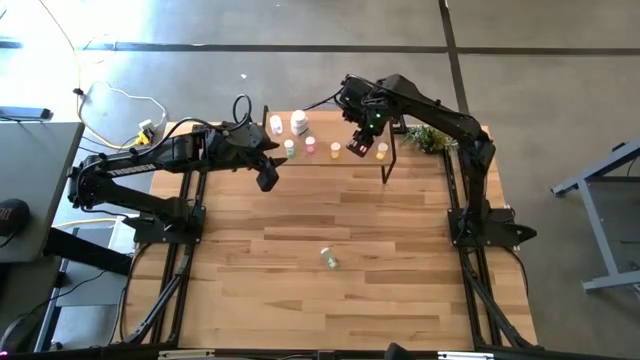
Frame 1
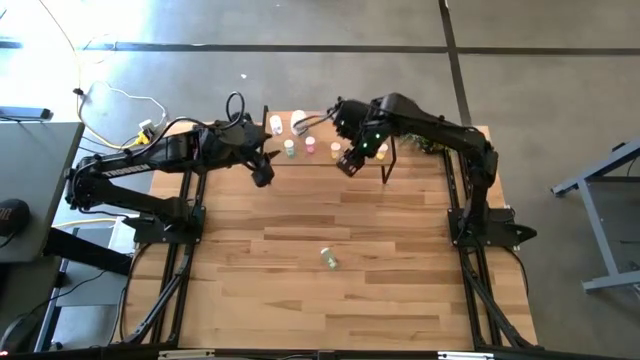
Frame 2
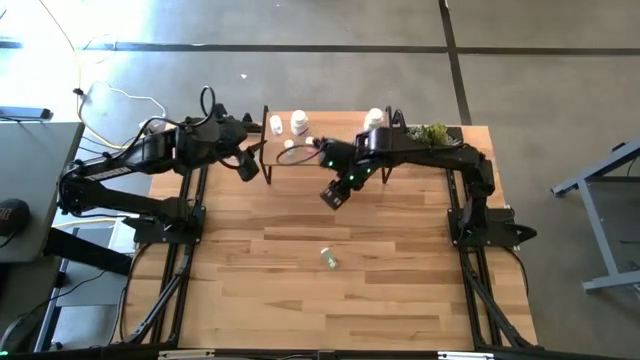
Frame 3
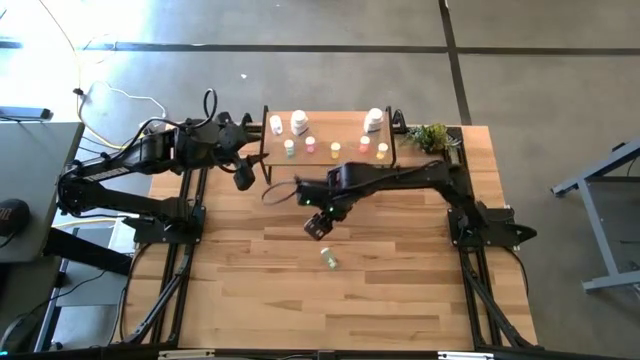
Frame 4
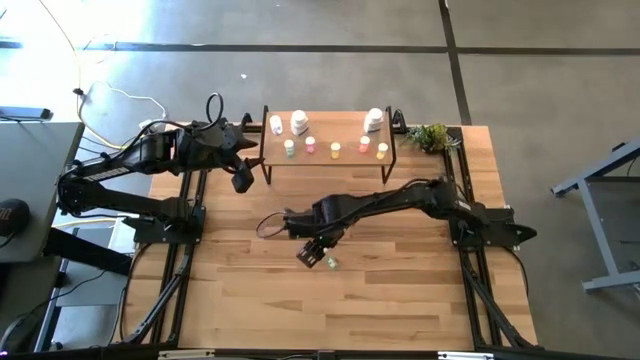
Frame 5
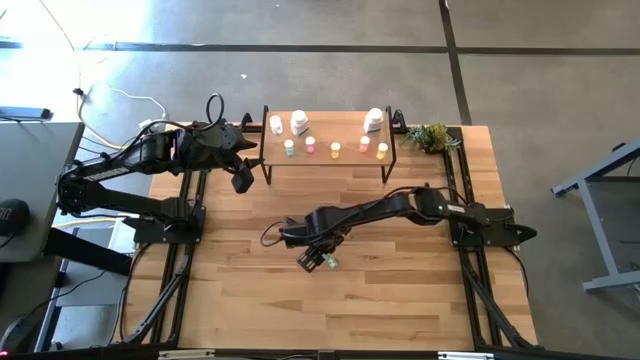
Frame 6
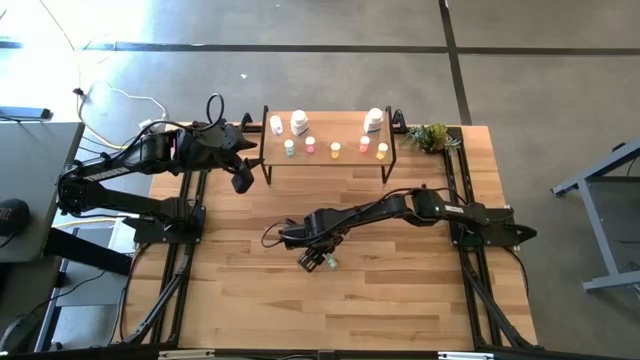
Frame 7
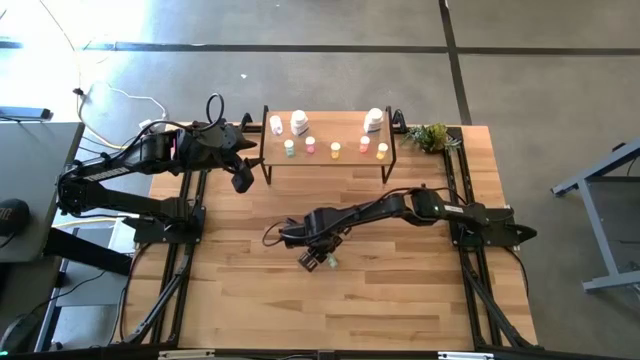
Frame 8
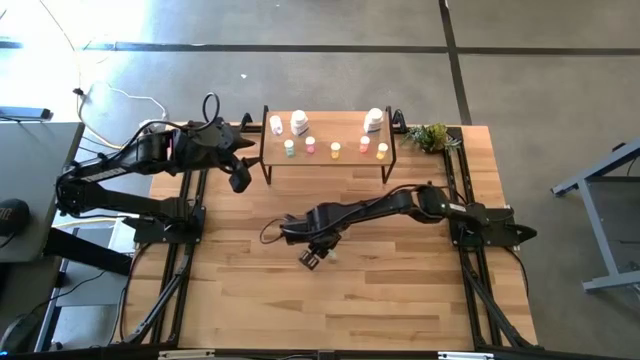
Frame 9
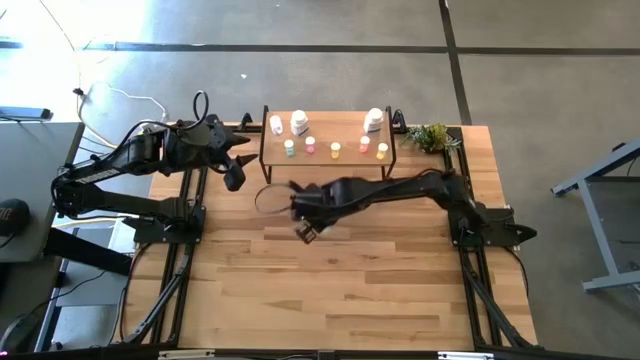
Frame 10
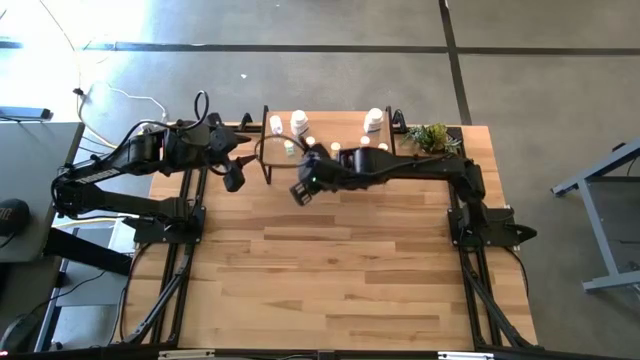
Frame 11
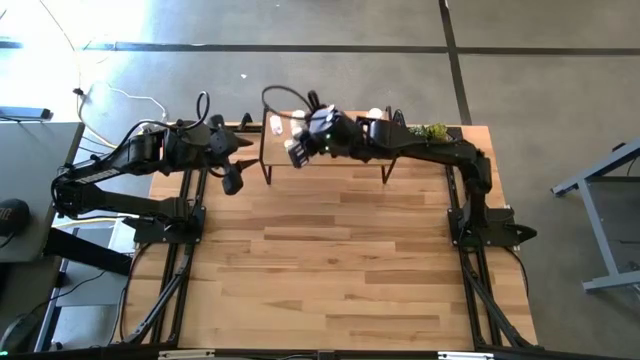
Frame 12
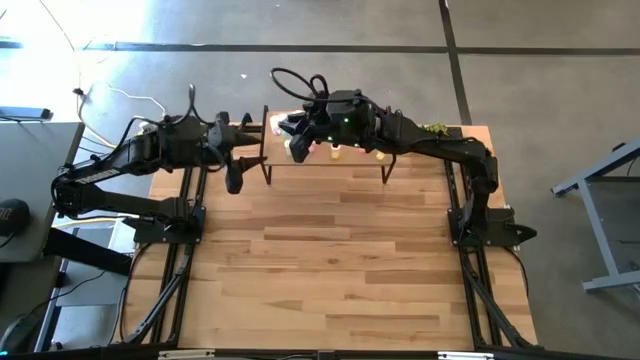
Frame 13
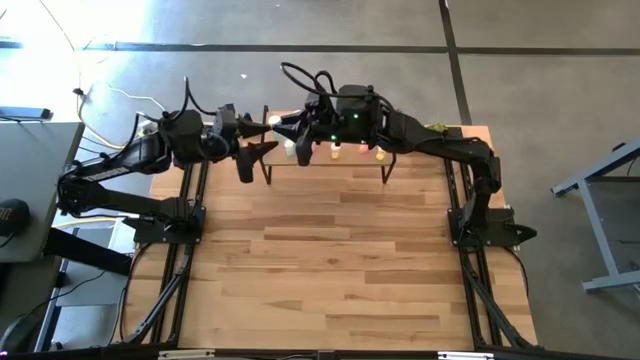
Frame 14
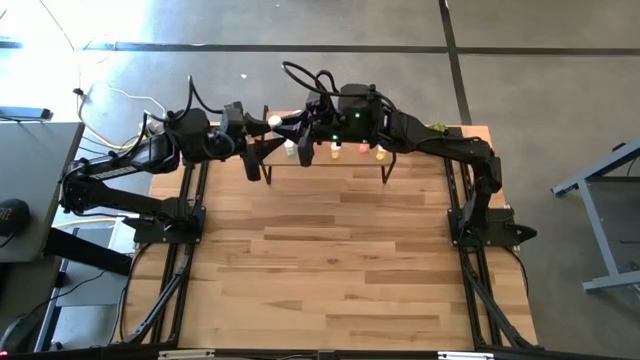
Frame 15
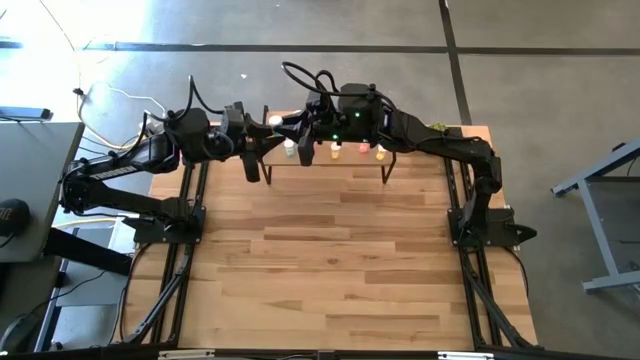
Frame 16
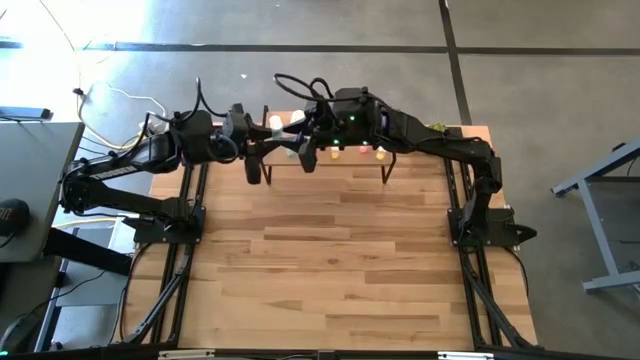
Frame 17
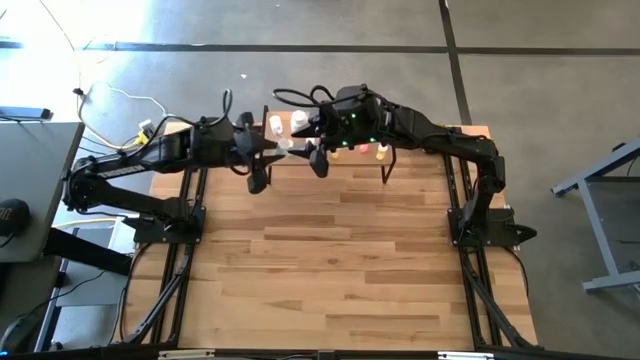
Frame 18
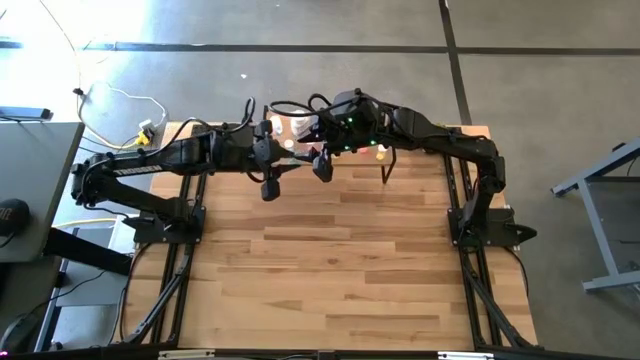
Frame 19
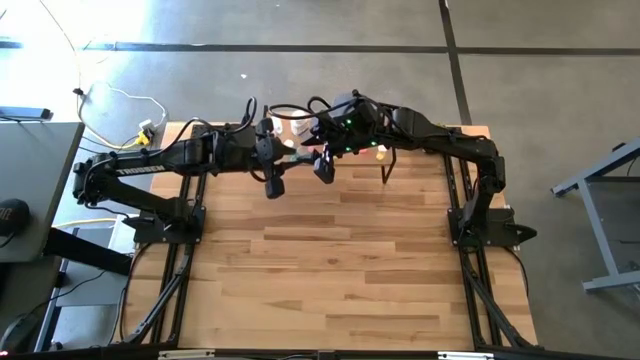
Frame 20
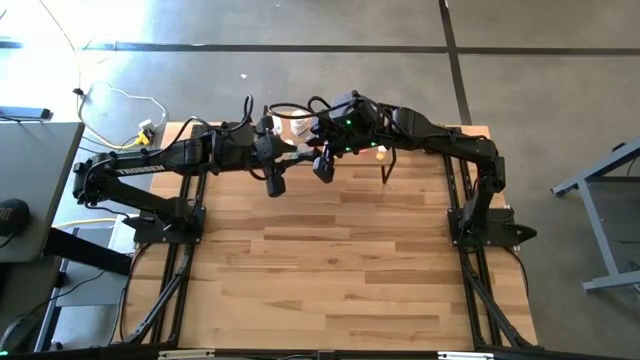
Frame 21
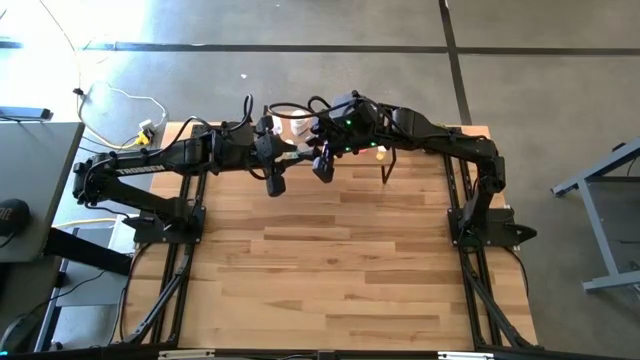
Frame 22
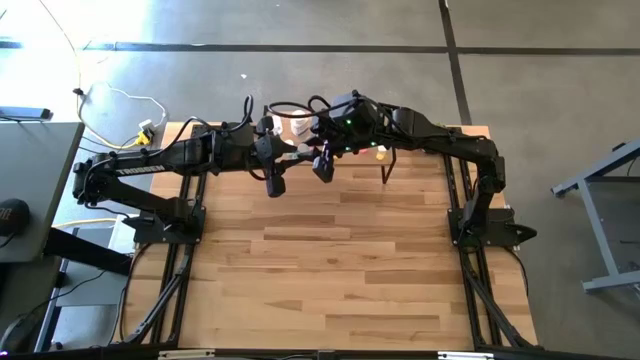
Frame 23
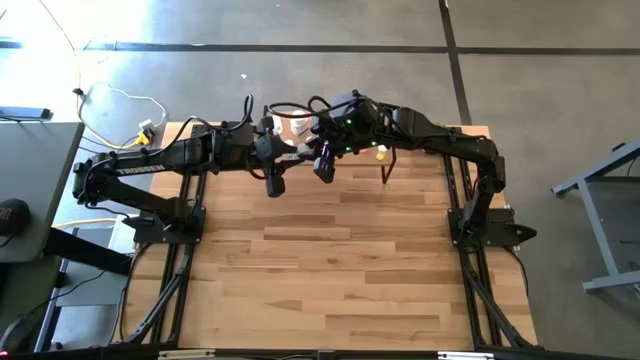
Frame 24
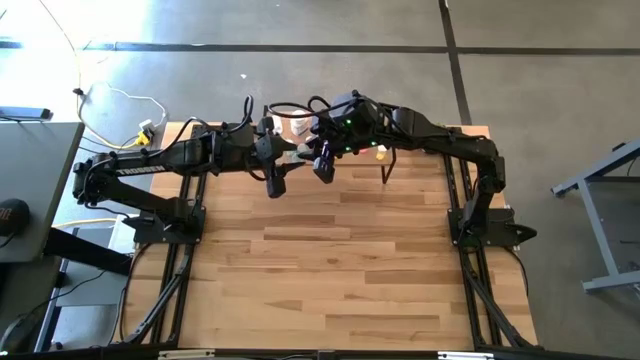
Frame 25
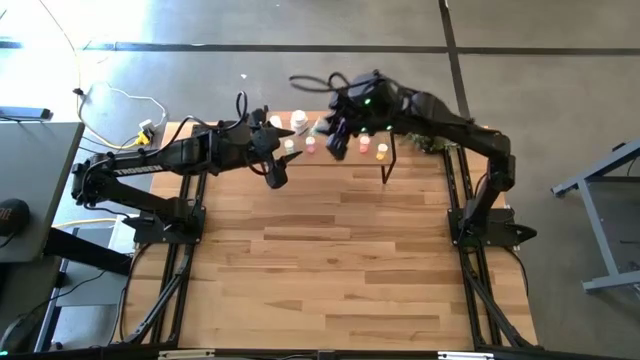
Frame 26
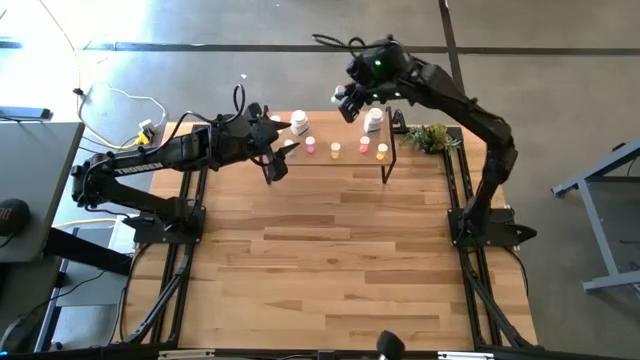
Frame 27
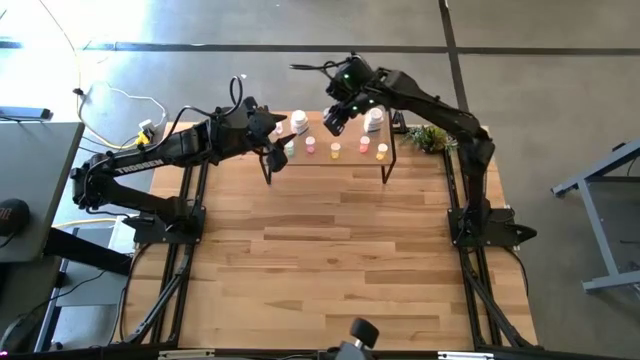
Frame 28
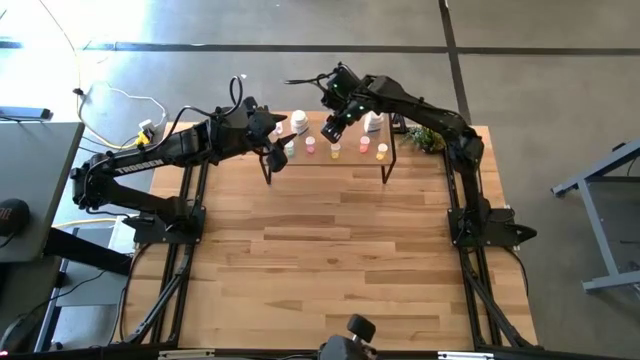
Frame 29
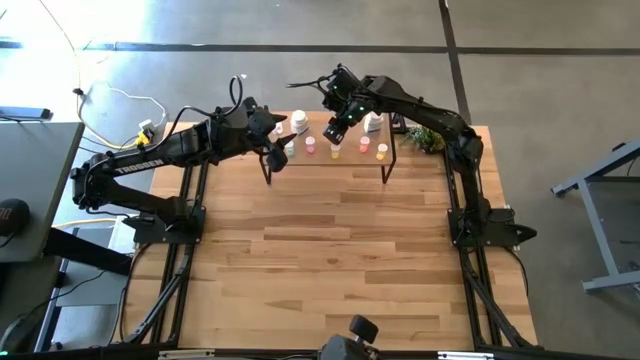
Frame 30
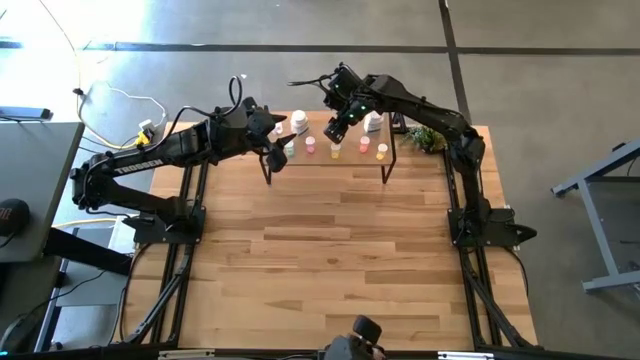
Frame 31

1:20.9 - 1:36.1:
Task: Pick and place medicine bottles onto shelf by color
Put the blue medicine bottle on the shelf

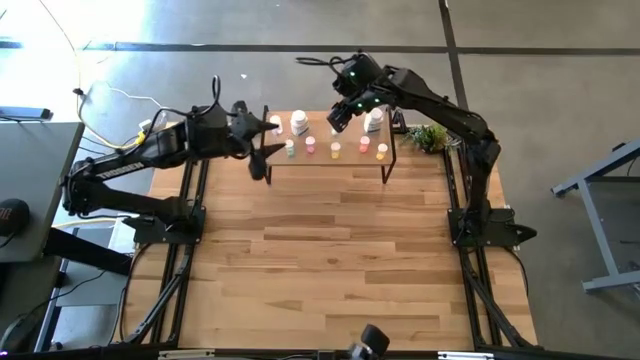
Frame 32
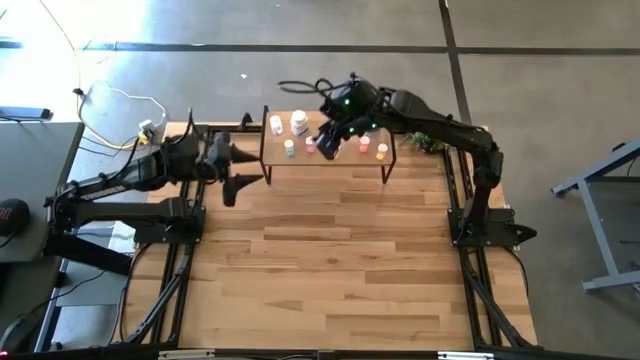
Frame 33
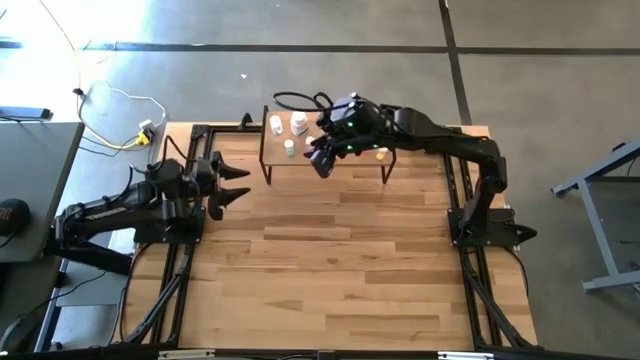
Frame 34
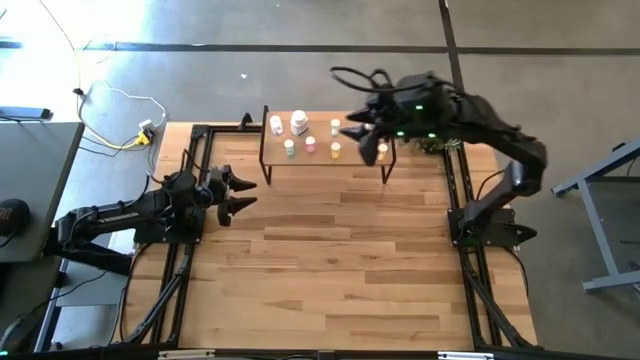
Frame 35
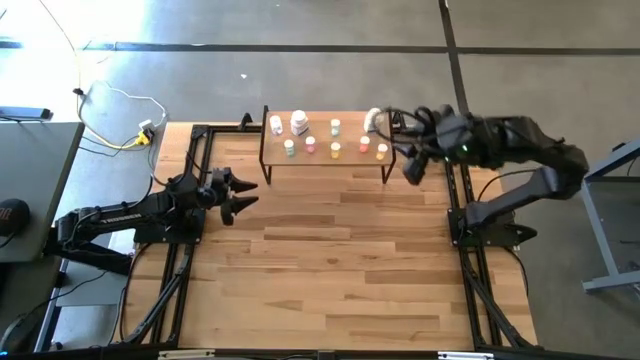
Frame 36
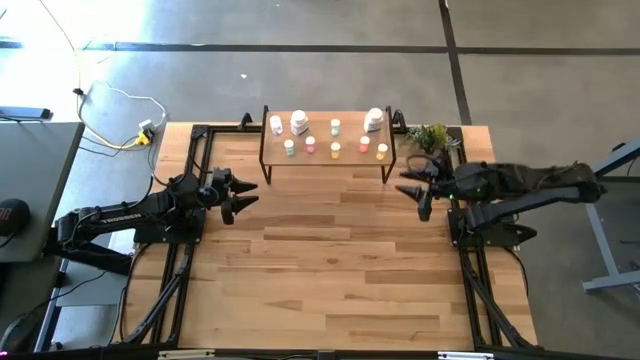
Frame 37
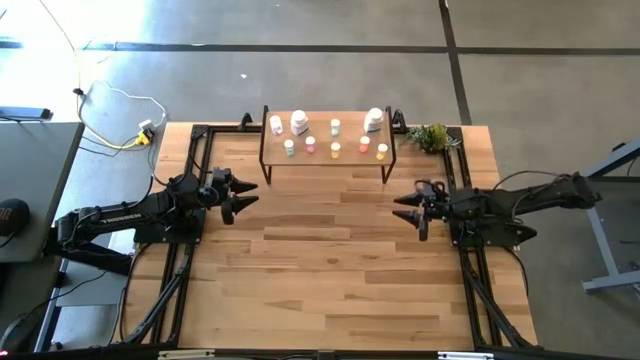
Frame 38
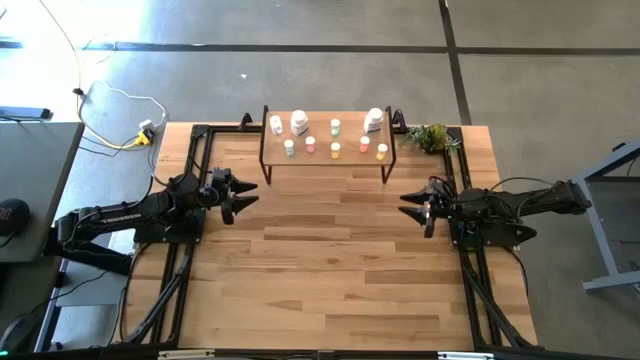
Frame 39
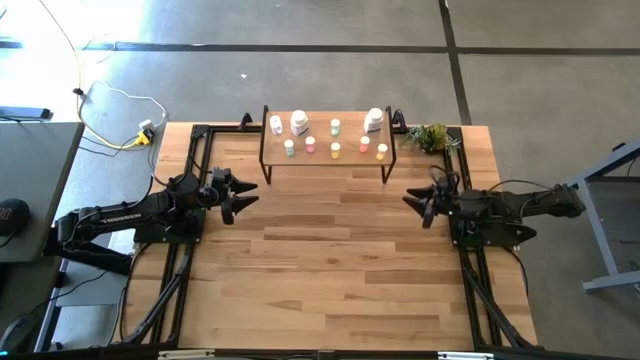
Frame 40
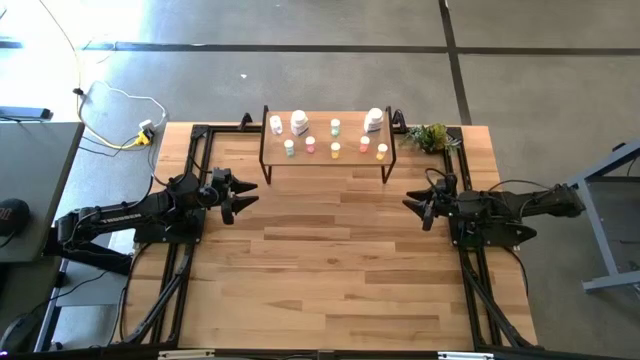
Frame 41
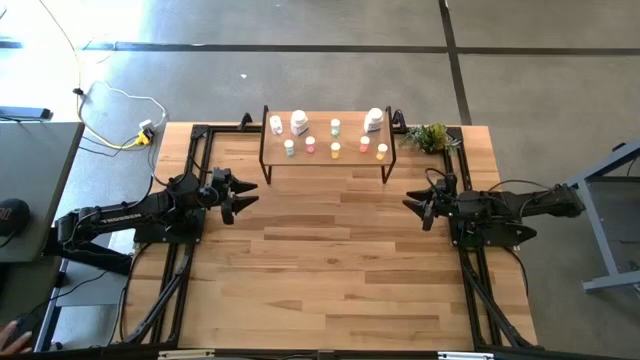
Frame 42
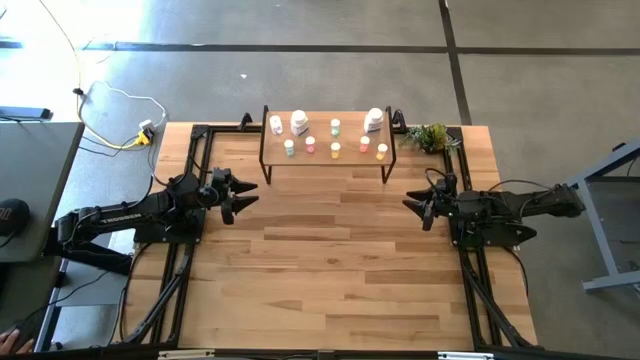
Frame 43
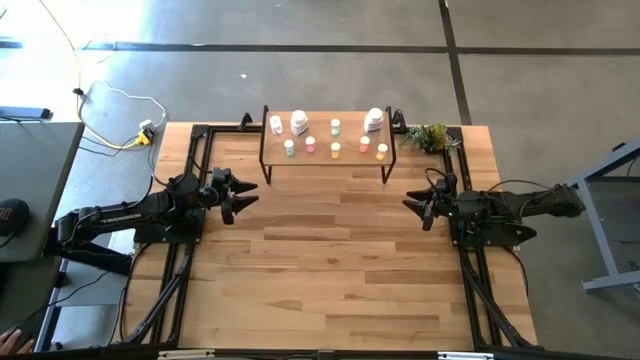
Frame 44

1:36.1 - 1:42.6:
Return To Home Position
